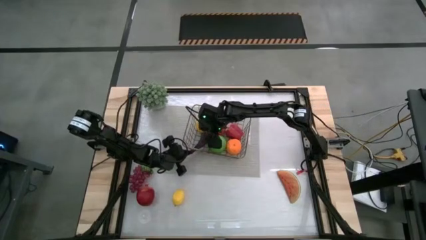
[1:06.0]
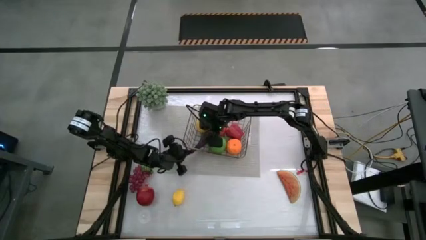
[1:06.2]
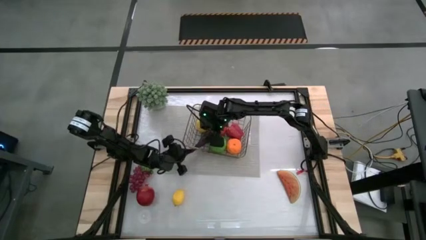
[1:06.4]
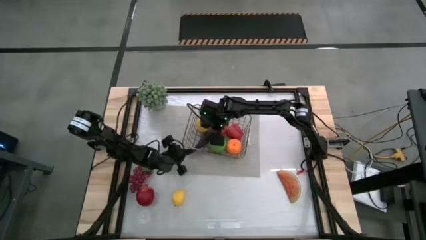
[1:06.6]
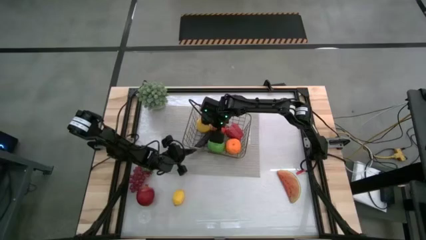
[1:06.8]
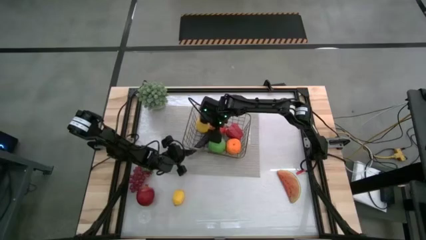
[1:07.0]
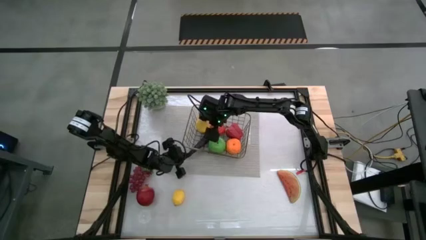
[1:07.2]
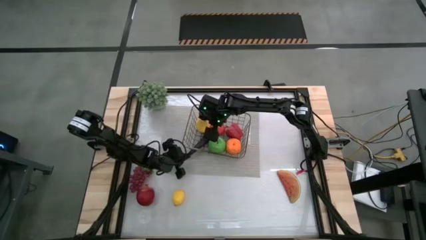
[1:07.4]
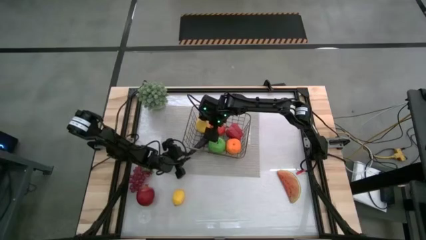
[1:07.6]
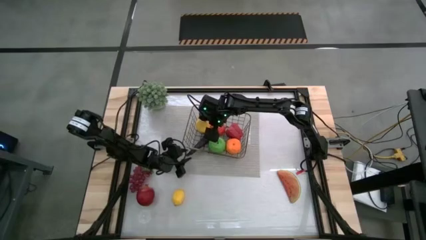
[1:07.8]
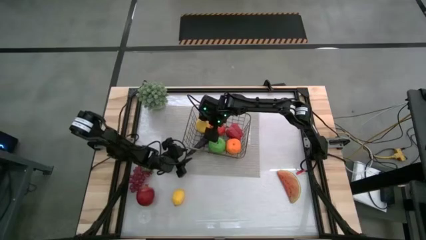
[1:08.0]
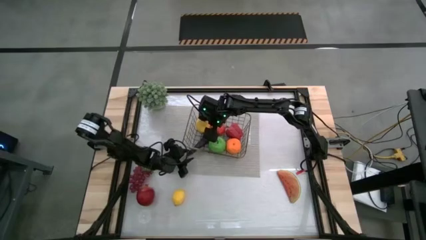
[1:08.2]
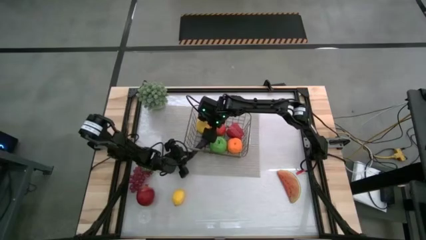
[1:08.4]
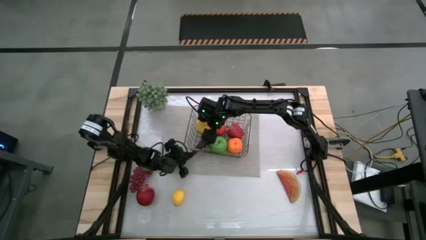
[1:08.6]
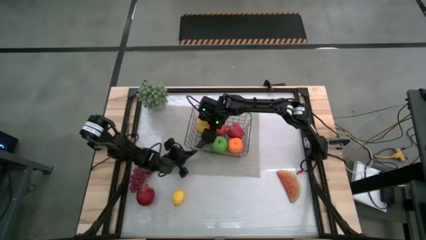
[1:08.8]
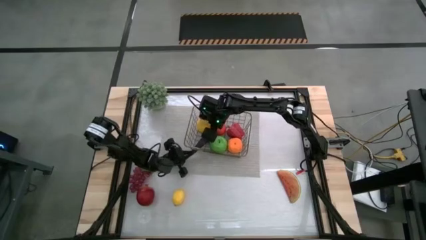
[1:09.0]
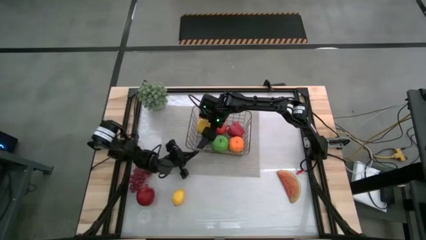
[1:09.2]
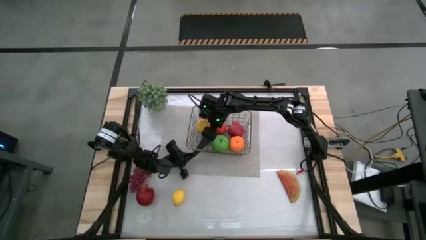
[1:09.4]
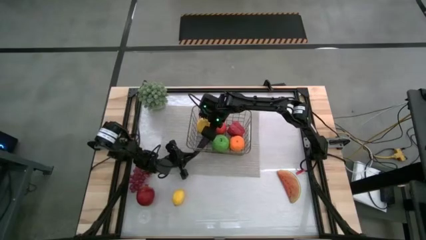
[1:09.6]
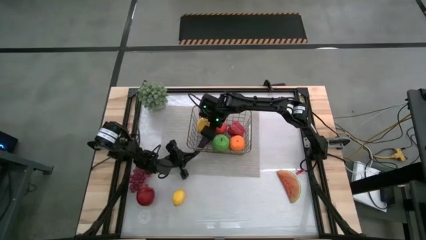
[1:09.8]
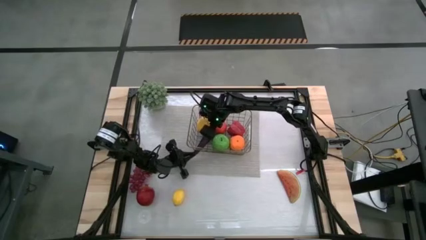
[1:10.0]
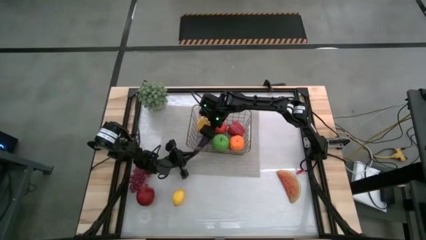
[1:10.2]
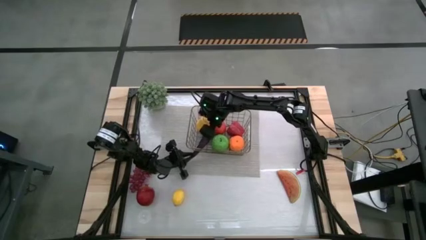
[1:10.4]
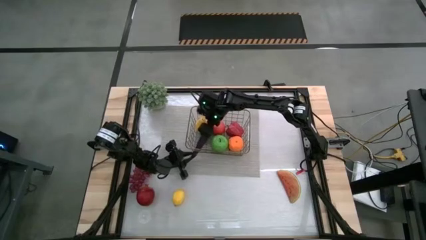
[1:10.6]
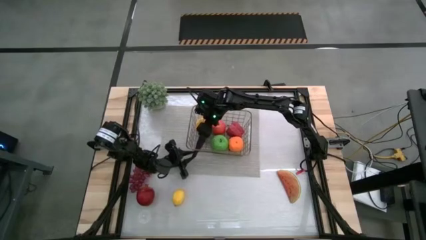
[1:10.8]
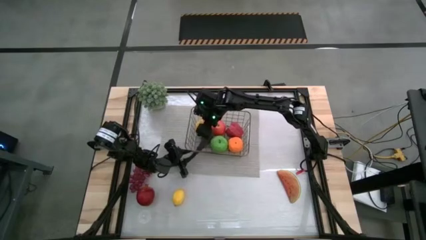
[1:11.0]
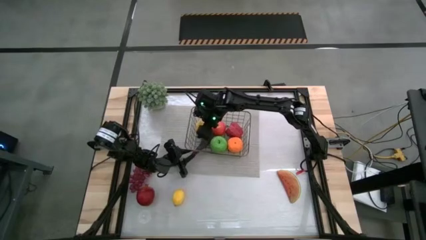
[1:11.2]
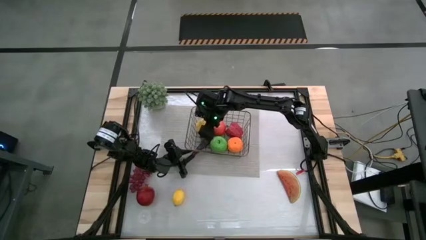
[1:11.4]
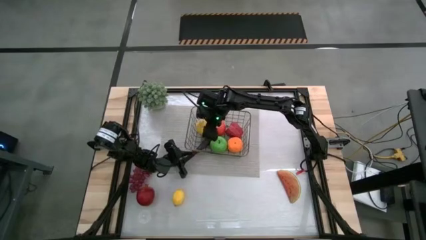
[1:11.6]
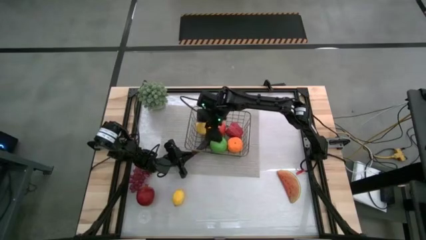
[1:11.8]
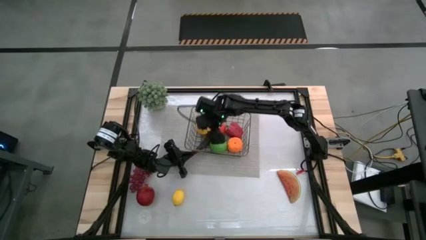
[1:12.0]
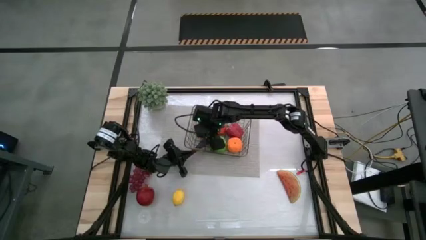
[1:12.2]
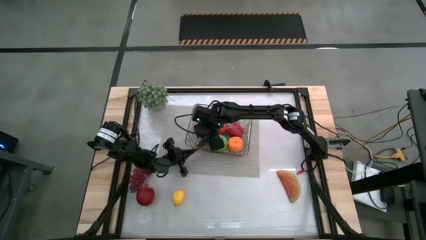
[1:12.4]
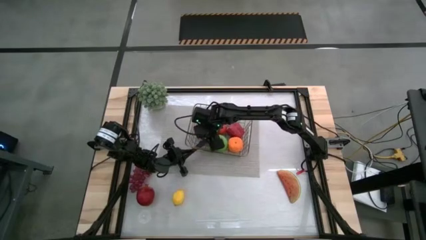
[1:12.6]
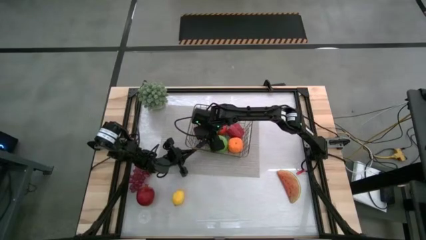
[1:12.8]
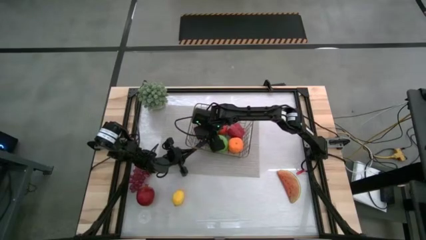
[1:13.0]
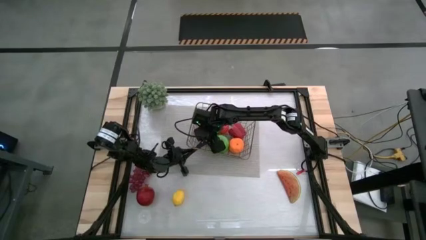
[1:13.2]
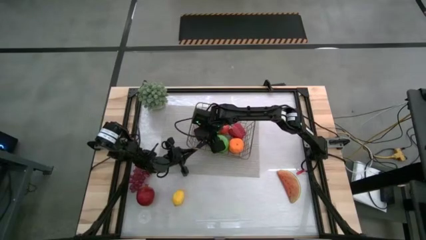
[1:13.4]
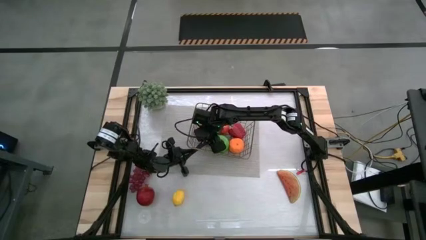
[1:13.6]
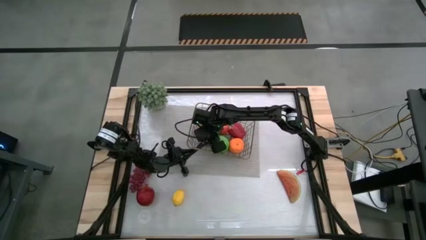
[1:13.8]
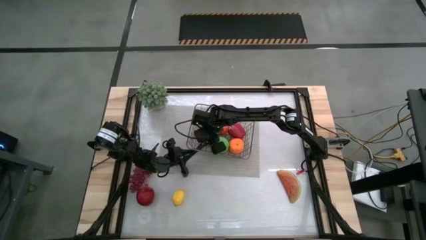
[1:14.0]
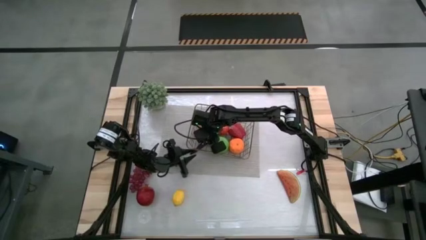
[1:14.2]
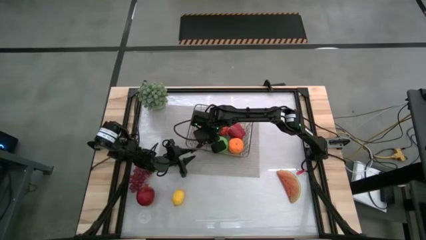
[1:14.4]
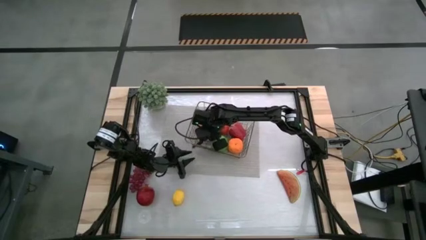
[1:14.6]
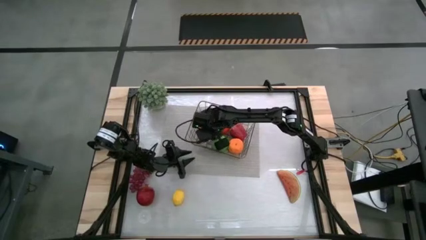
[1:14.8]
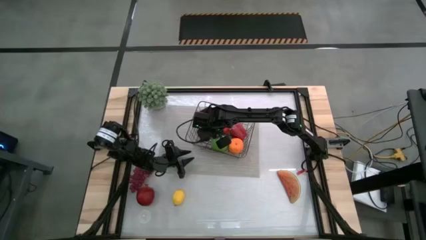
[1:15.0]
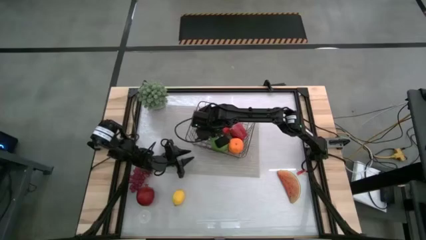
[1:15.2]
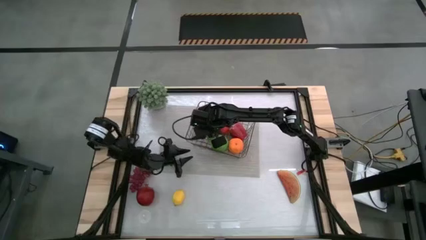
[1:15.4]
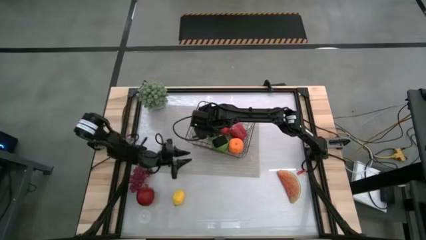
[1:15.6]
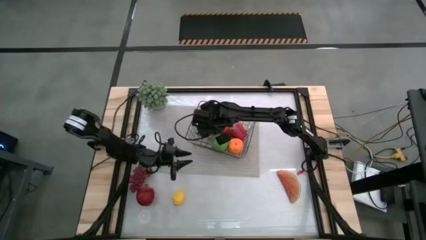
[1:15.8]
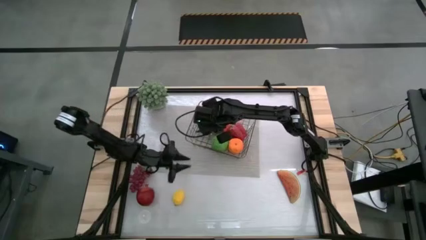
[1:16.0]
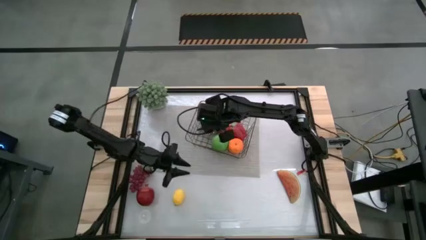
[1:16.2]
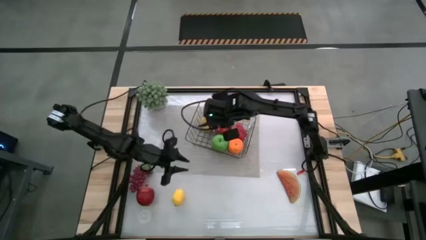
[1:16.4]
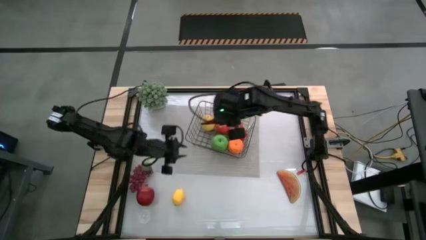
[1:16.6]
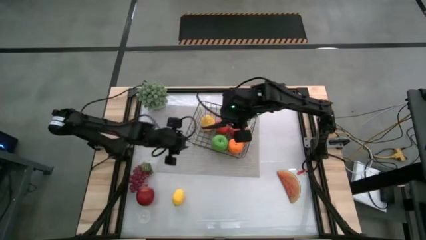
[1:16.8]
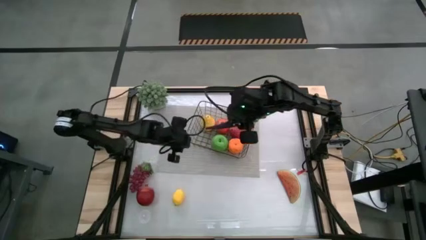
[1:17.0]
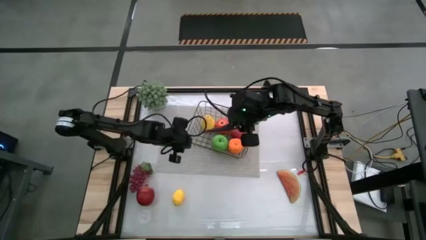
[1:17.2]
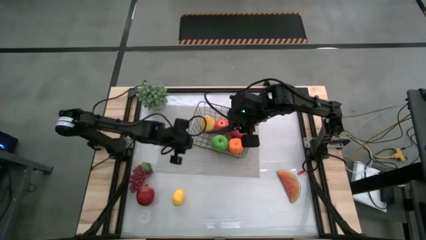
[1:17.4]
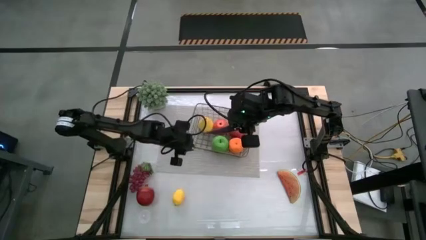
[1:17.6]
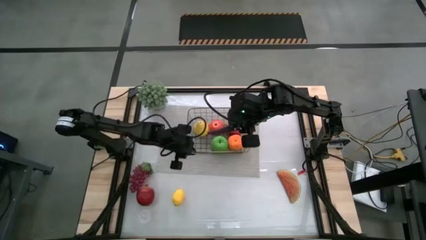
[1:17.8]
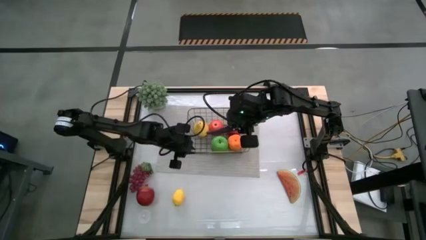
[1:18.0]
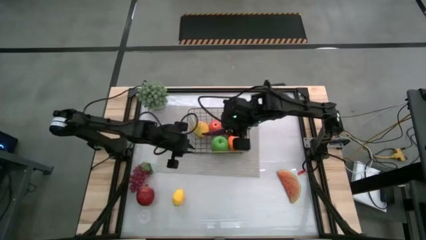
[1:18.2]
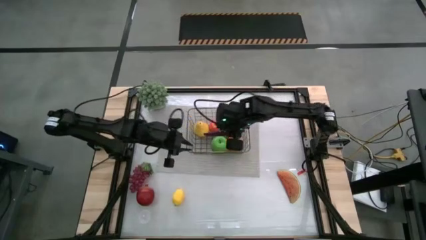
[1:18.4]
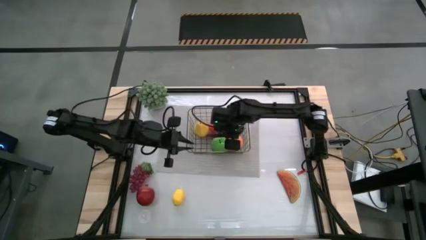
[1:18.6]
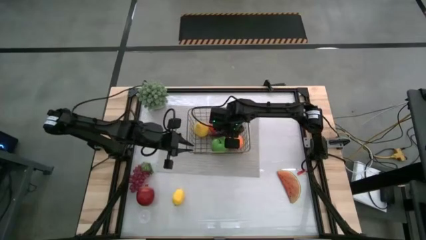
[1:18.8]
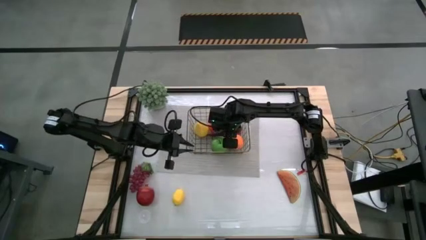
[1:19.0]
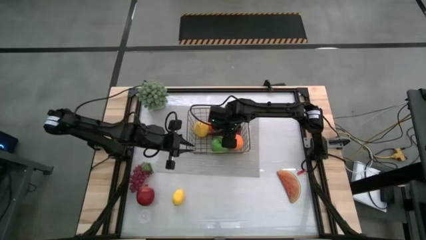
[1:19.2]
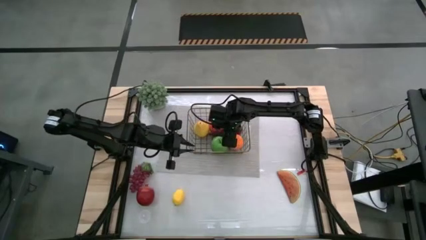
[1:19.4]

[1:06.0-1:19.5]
Task: Build produce basket
Adjust the eggplant in the wire basket
